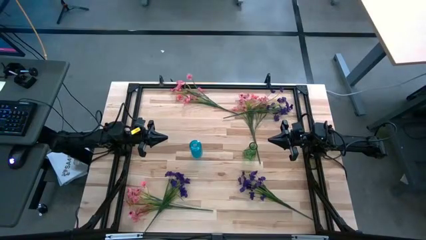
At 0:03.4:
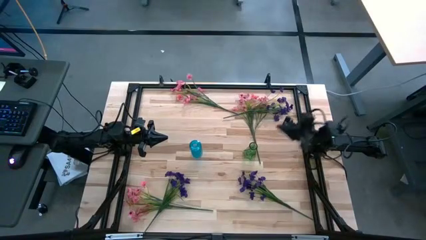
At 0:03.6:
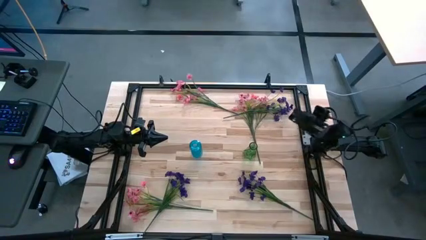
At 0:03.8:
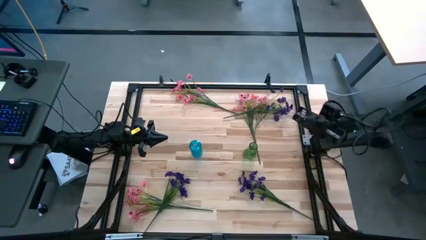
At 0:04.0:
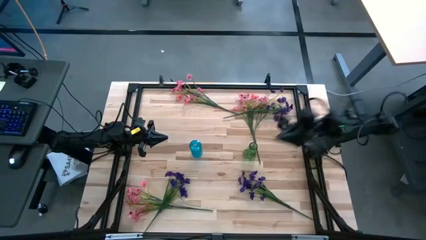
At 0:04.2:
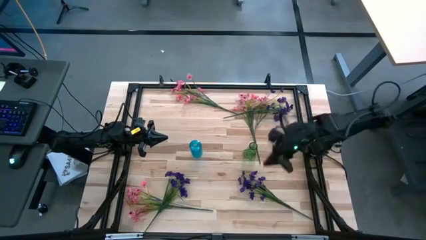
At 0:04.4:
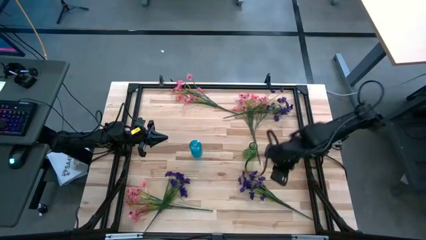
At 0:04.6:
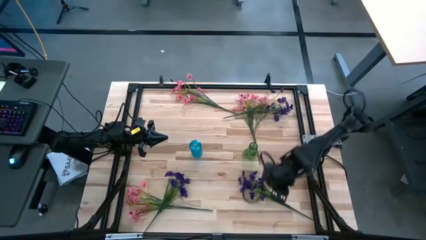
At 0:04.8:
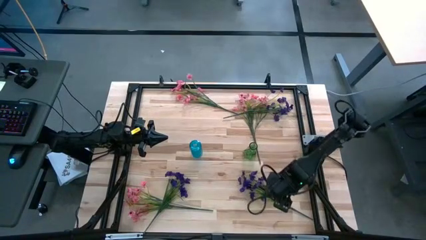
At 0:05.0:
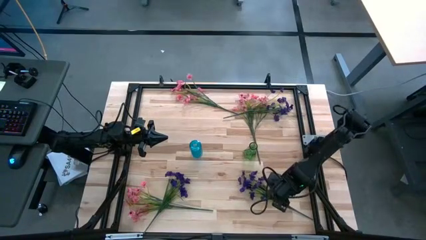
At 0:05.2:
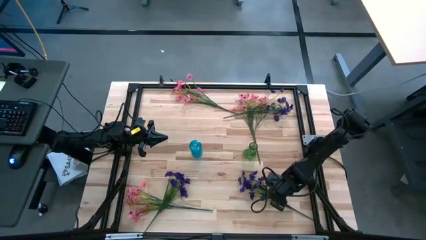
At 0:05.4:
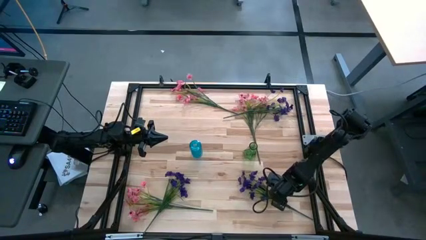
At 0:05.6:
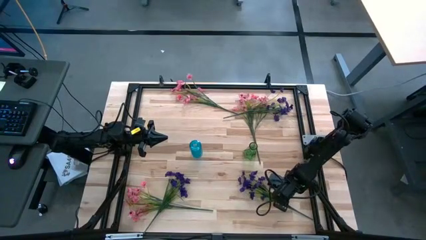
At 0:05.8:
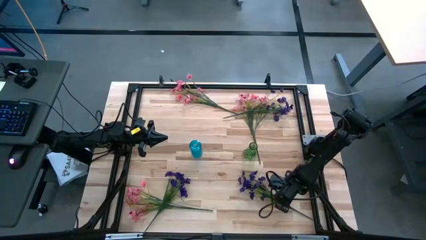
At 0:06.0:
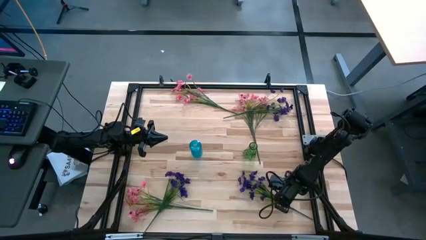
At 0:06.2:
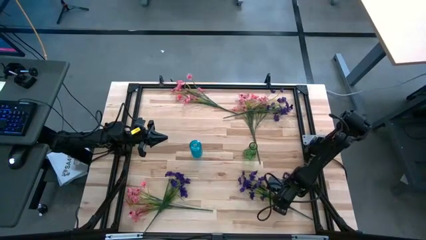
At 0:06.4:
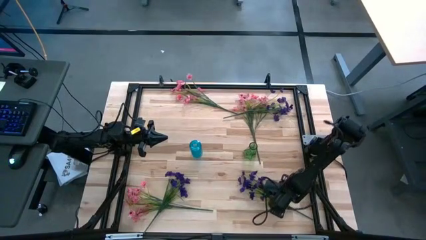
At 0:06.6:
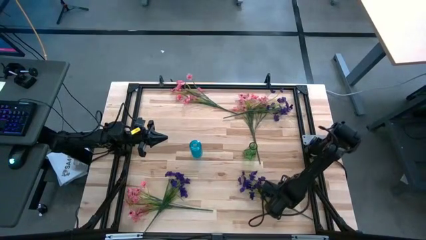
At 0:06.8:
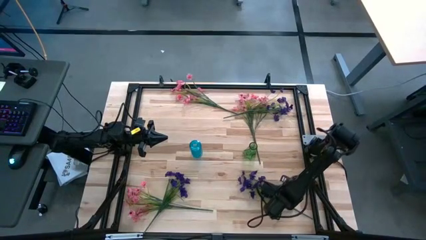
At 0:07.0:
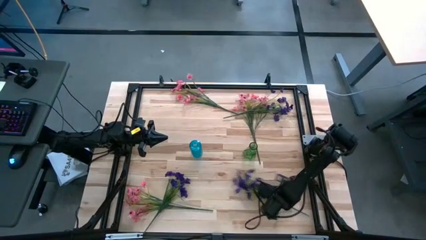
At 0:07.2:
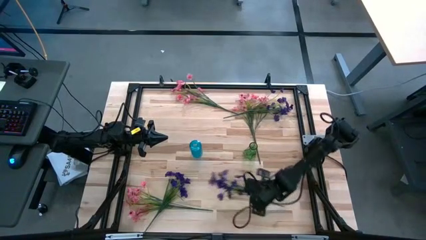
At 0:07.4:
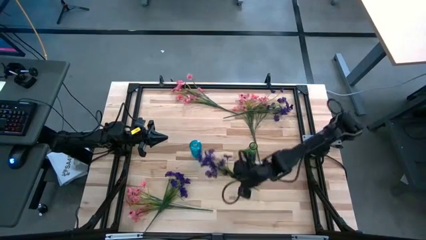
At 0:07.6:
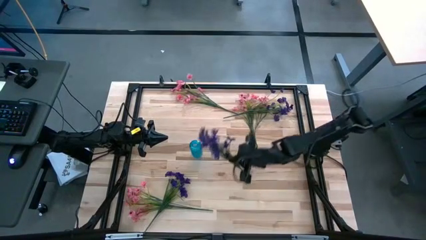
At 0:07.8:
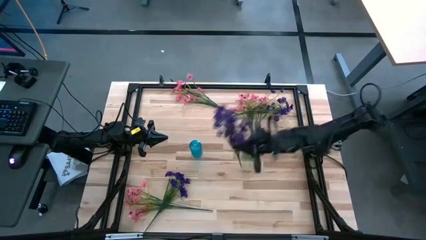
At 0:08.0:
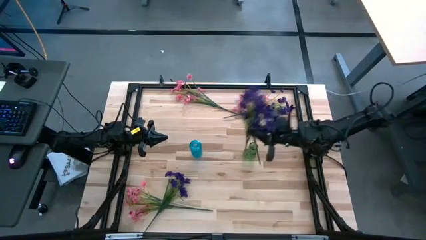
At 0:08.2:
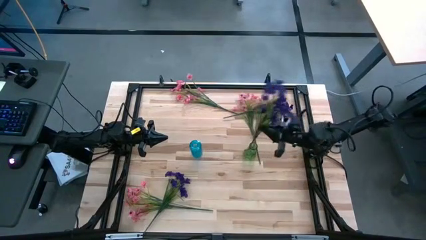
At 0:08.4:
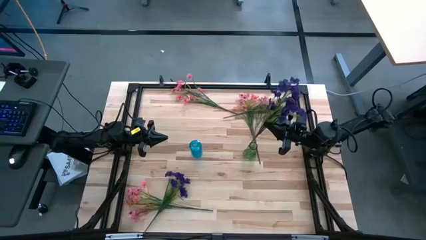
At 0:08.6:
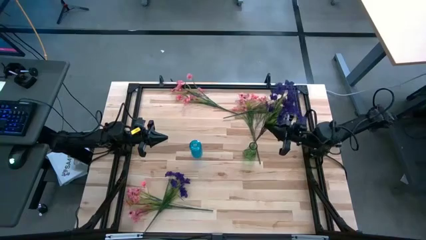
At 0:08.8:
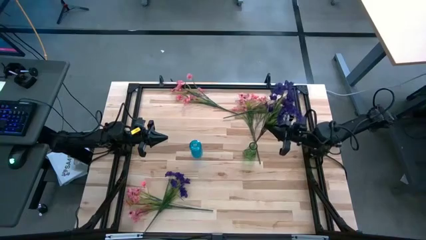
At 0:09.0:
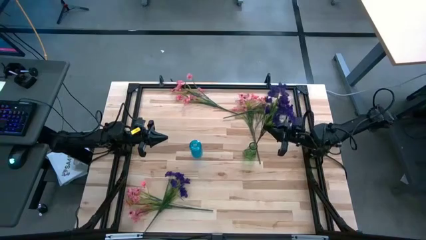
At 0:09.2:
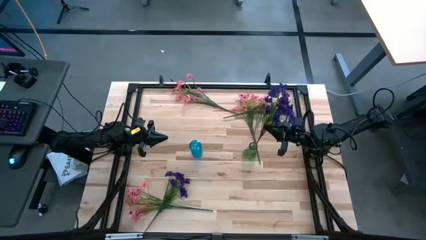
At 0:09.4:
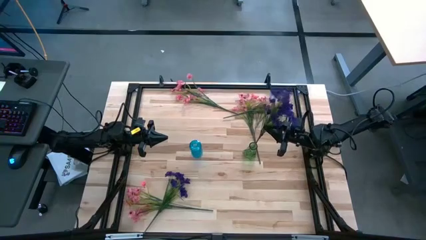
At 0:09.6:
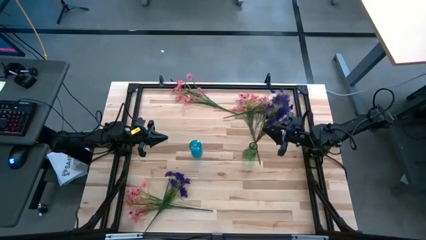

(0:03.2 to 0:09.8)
Task: Sort flowers into vase by color
Put the bottom right violet flowers into the green vase

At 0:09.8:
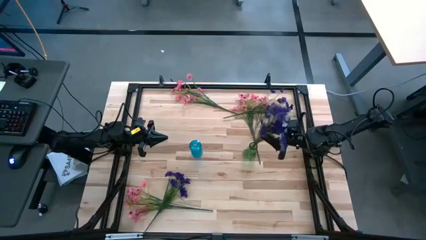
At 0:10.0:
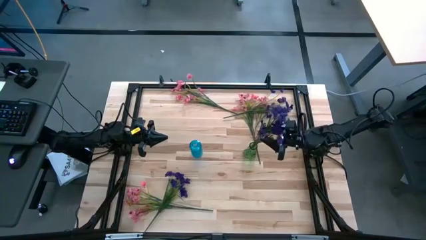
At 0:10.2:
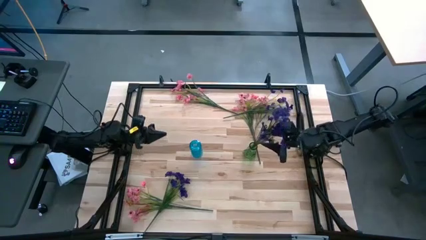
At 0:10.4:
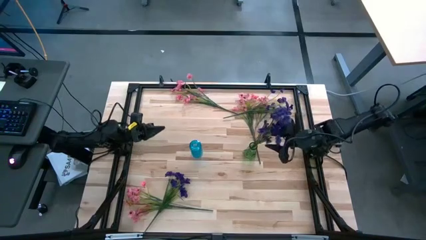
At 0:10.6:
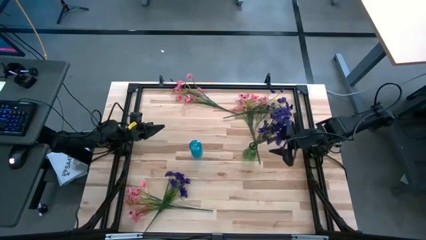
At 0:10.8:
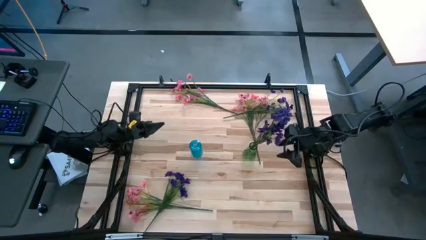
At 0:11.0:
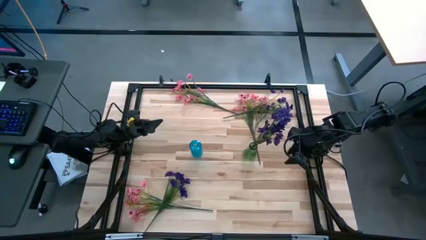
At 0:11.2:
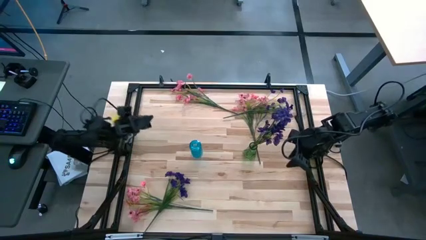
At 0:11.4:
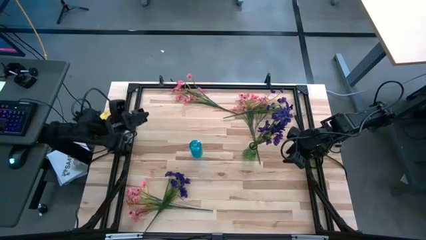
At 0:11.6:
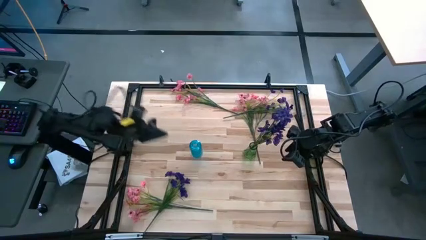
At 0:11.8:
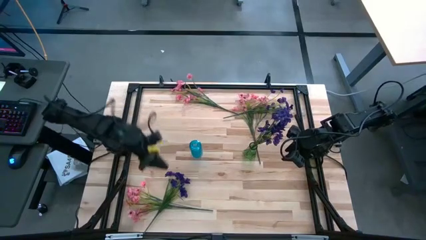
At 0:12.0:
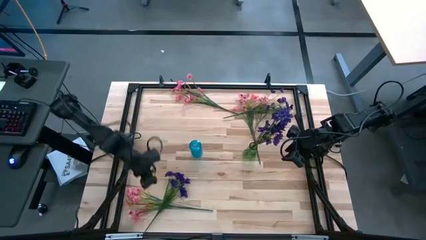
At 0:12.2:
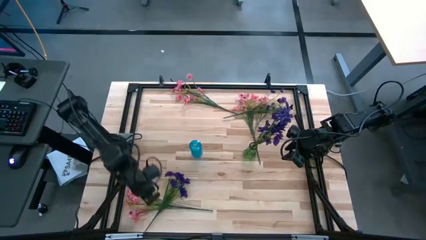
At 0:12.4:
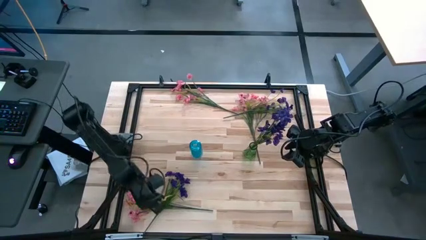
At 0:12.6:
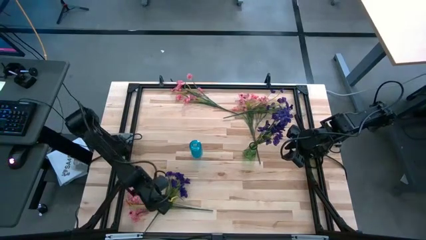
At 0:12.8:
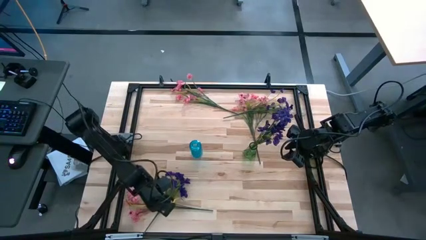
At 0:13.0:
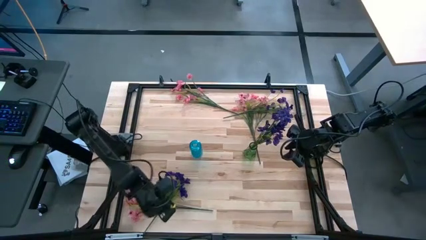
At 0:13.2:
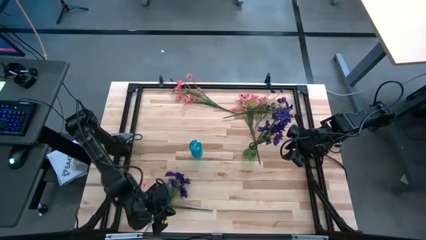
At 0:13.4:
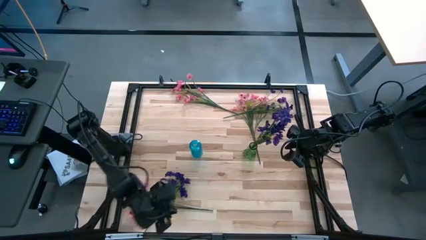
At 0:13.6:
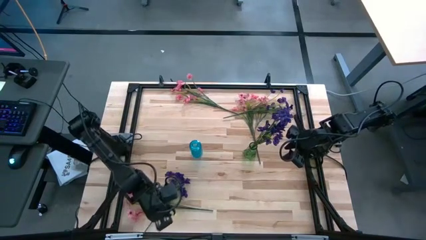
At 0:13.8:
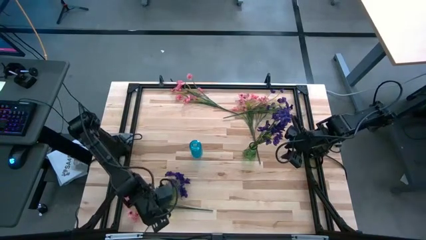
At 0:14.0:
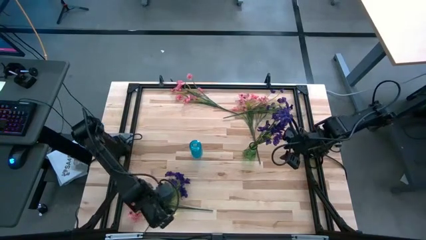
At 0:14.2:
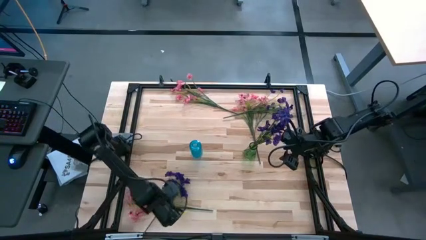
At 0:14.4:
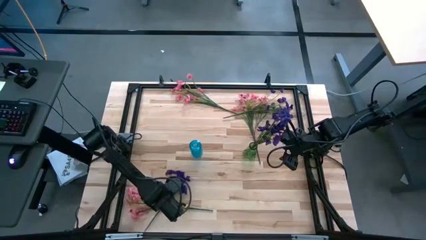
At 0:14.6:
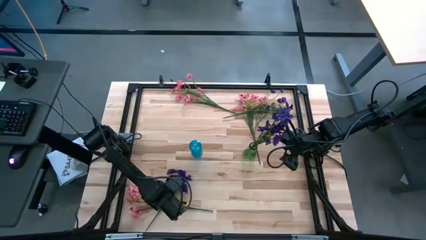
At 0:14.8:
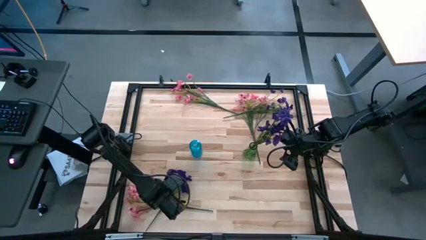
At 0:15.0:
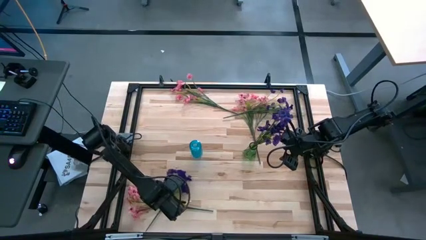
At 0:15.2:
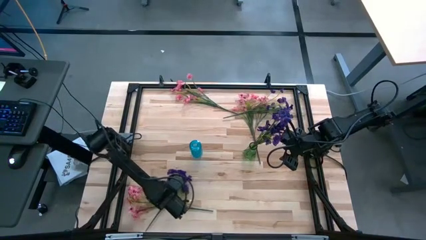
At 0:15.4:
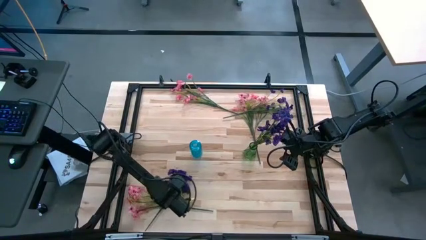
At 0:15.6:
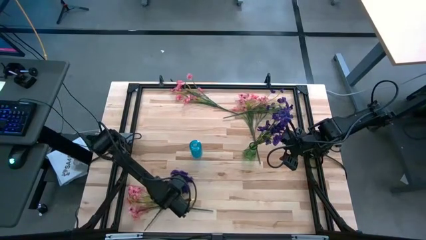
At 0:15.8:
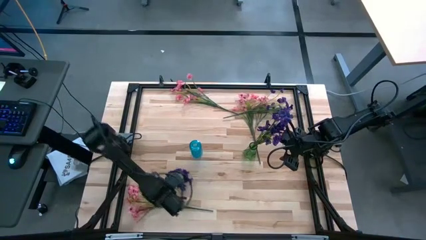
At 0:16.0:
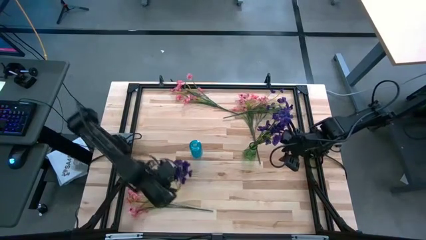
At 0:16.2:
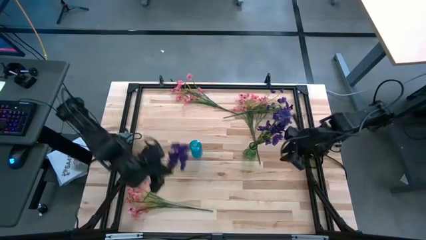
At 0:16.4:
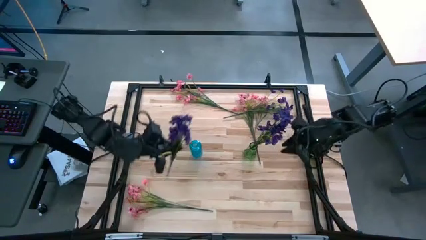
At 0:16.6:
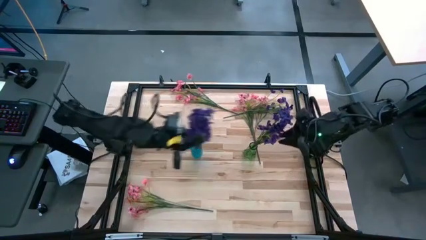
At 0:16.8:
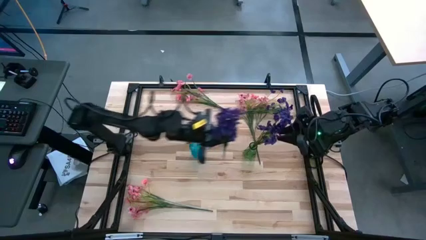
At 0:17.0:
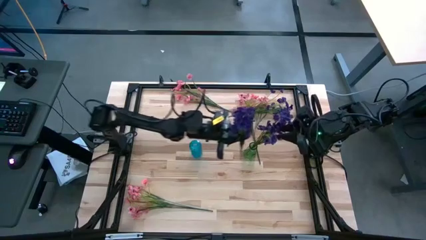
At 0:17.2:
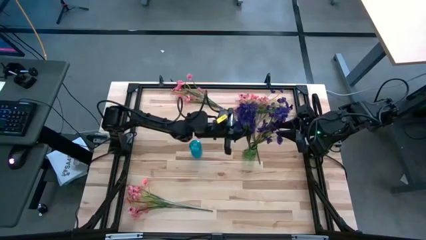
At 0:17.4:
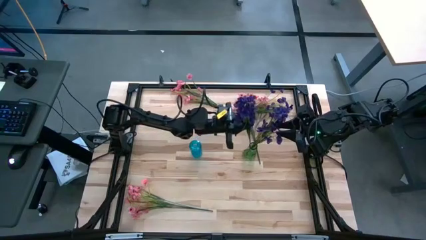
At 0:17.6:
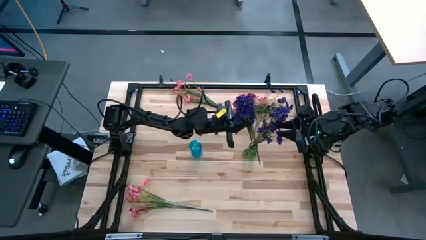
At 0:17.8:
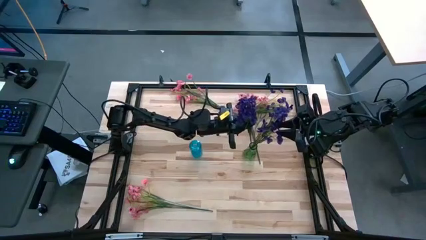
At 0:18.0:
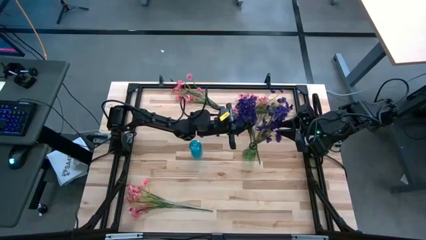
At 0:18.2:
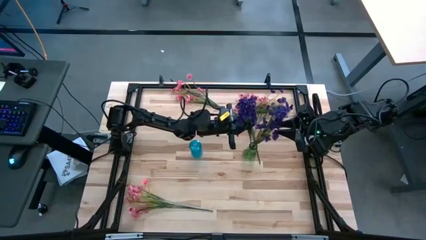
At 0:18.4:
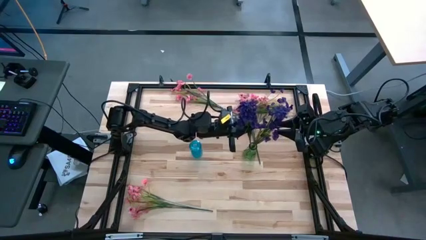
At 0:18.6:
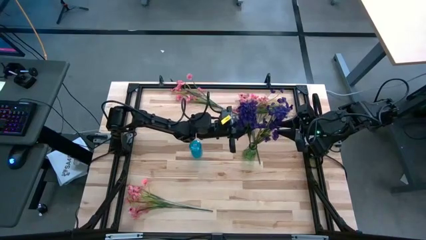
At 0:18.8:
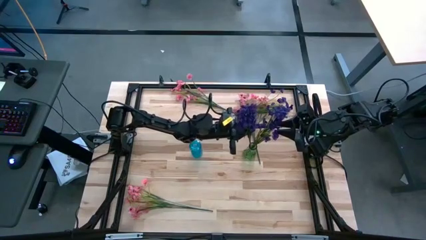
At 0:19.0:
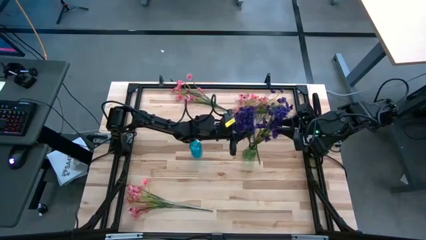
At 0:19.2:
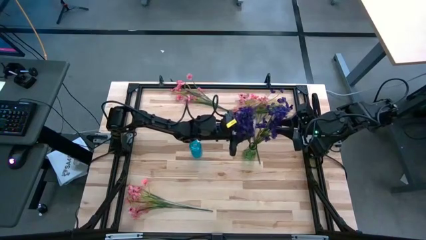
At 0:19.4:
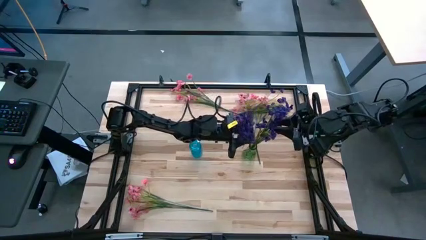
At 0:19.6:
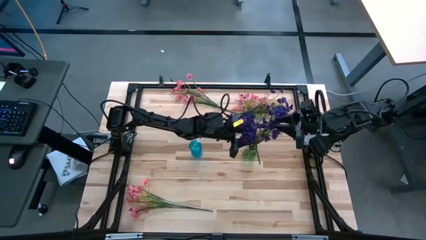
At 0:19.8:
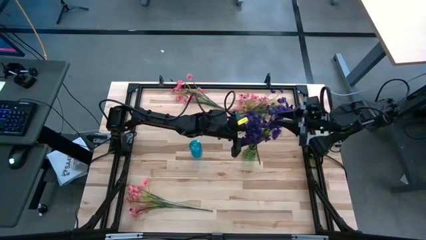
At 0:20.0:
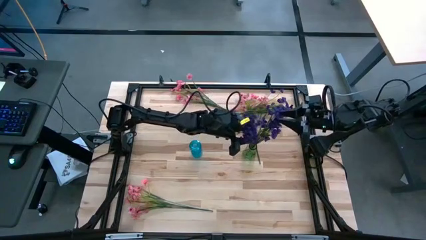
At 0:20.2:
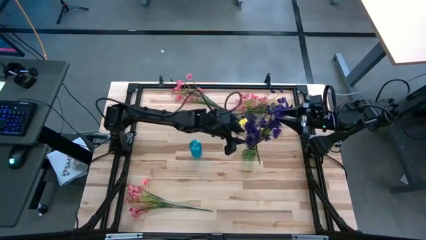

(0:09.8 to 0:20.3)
Put the bottom violet flowers into the green vase
